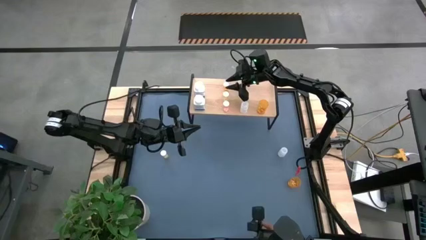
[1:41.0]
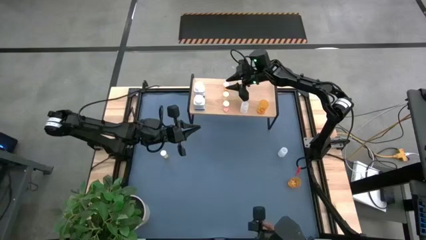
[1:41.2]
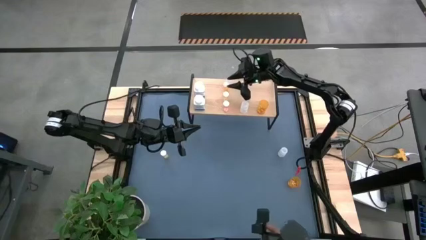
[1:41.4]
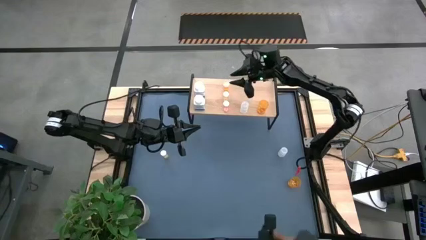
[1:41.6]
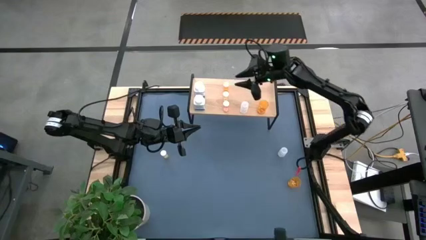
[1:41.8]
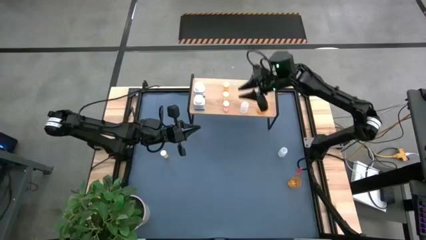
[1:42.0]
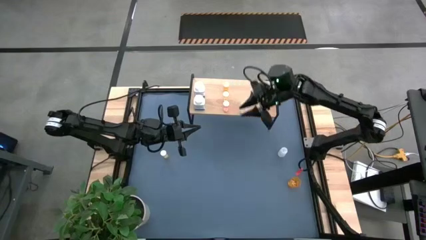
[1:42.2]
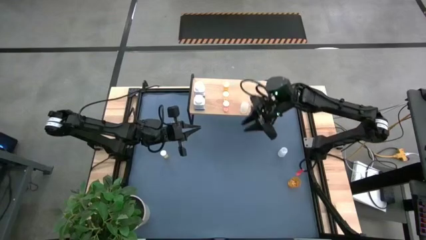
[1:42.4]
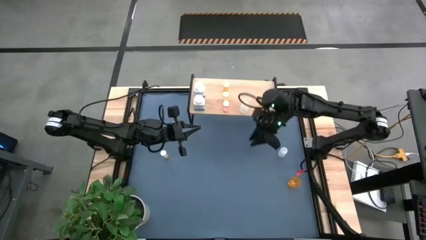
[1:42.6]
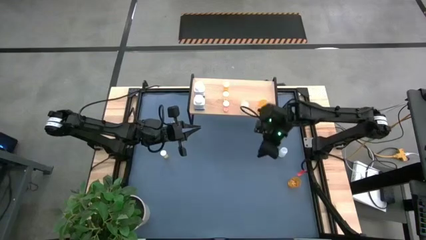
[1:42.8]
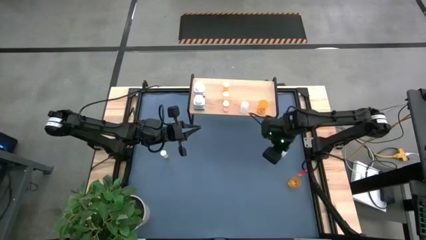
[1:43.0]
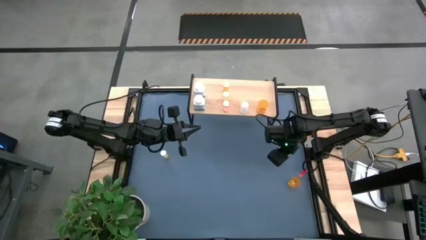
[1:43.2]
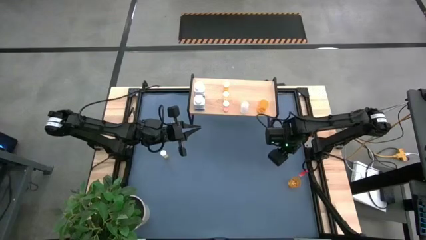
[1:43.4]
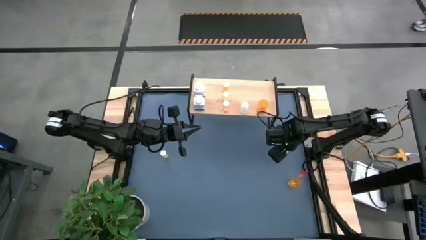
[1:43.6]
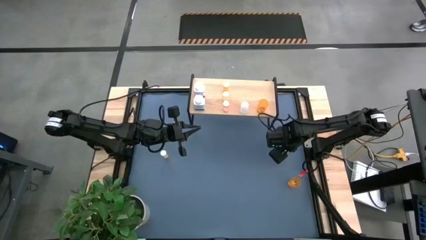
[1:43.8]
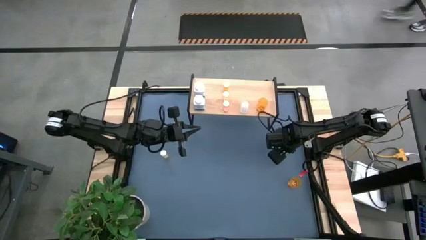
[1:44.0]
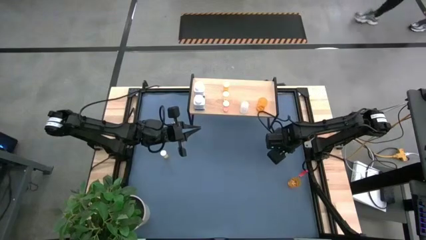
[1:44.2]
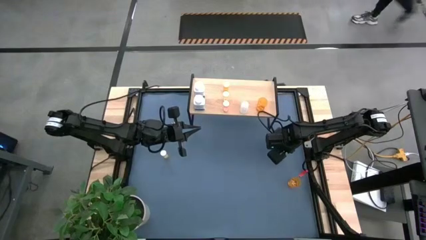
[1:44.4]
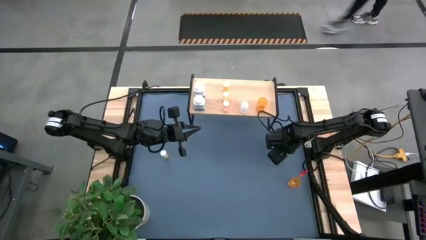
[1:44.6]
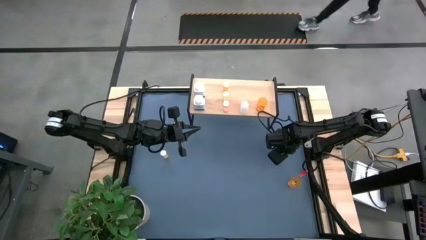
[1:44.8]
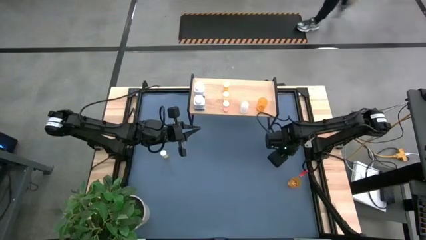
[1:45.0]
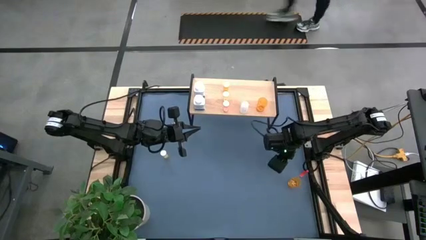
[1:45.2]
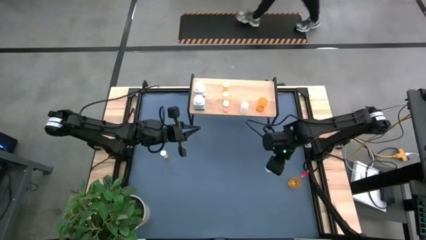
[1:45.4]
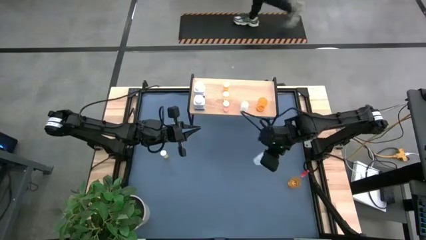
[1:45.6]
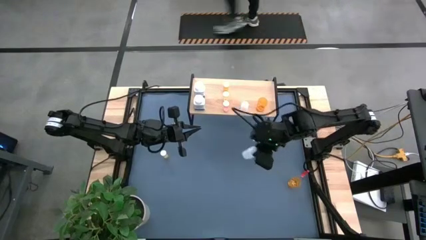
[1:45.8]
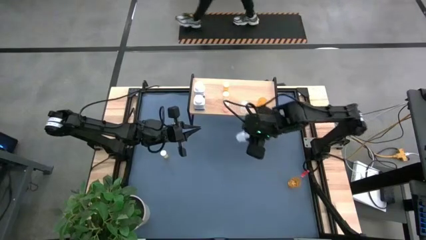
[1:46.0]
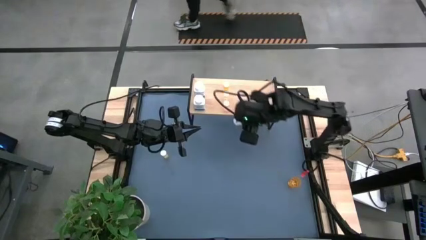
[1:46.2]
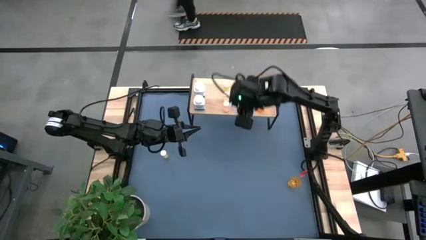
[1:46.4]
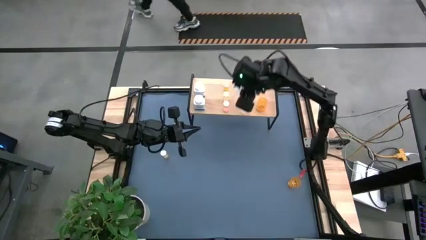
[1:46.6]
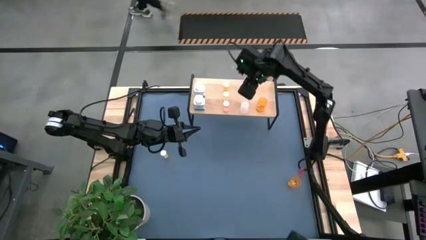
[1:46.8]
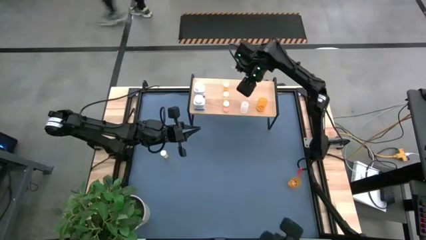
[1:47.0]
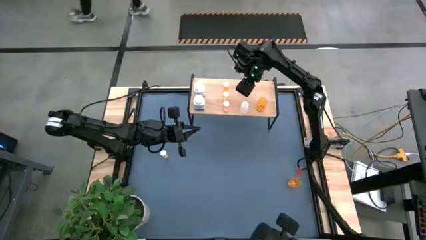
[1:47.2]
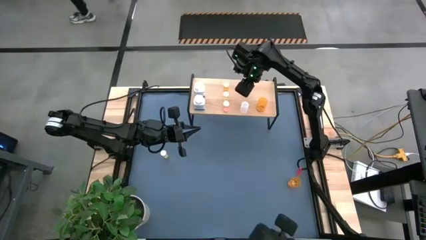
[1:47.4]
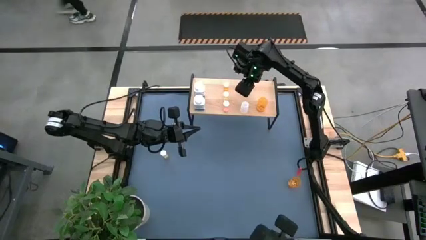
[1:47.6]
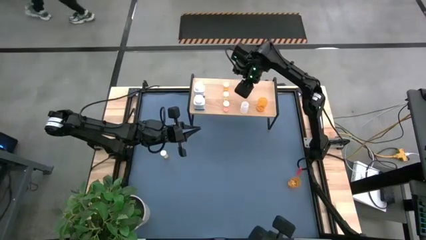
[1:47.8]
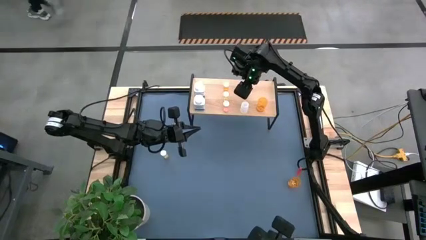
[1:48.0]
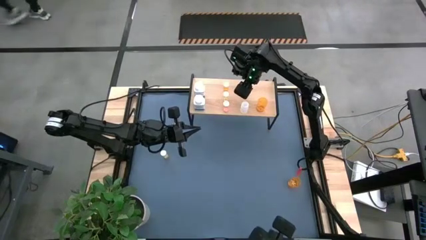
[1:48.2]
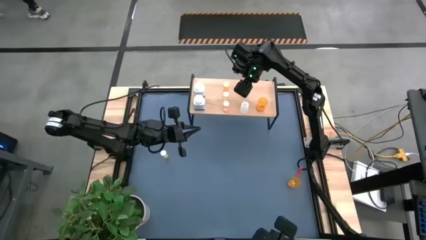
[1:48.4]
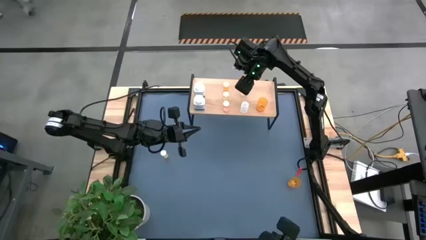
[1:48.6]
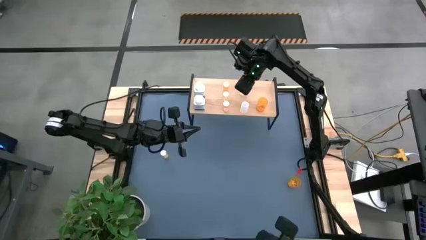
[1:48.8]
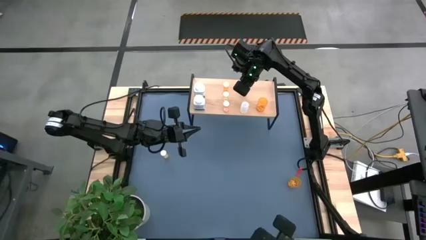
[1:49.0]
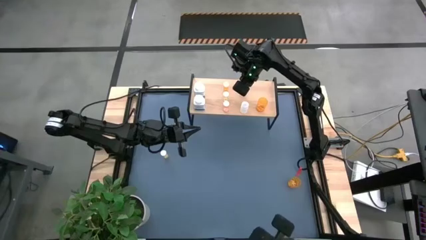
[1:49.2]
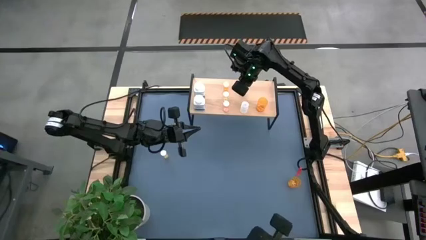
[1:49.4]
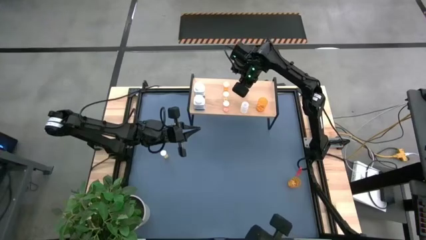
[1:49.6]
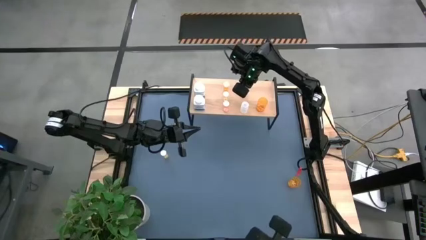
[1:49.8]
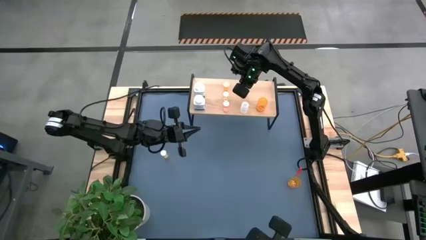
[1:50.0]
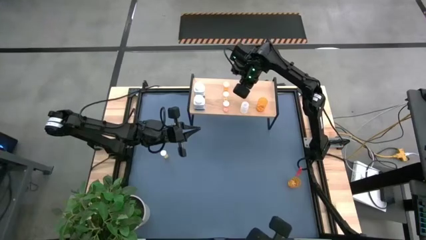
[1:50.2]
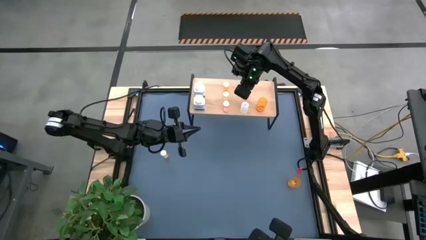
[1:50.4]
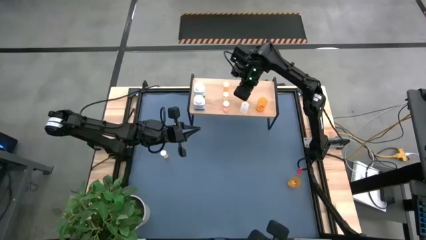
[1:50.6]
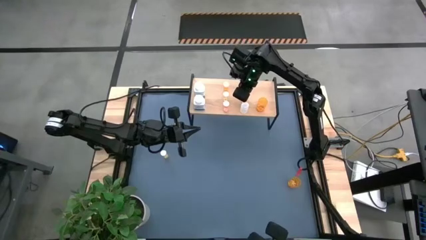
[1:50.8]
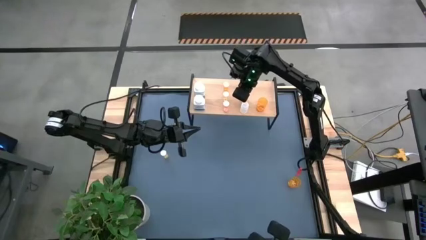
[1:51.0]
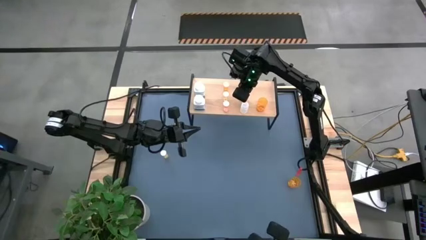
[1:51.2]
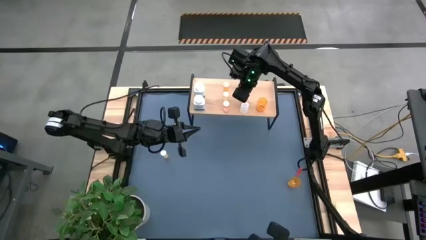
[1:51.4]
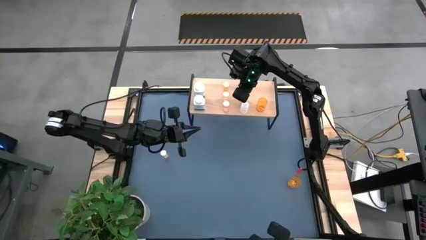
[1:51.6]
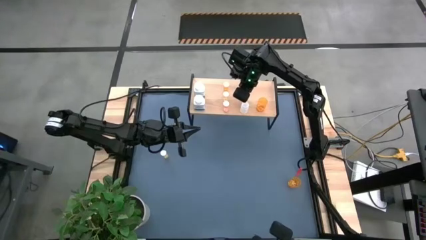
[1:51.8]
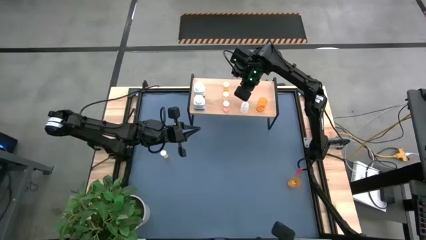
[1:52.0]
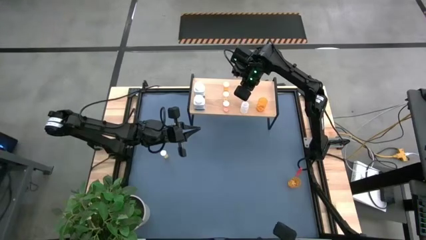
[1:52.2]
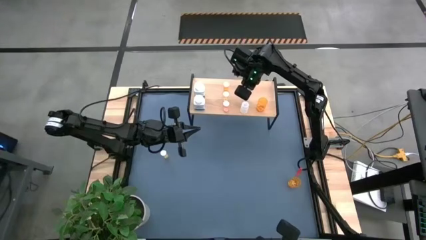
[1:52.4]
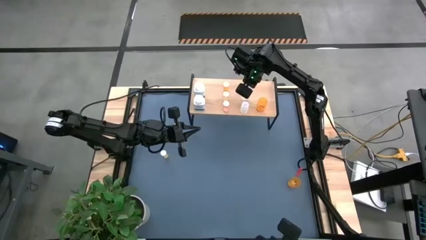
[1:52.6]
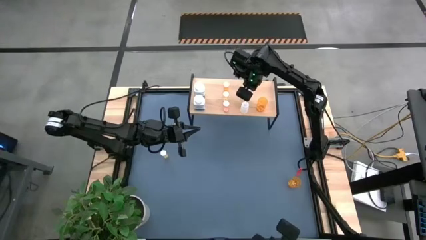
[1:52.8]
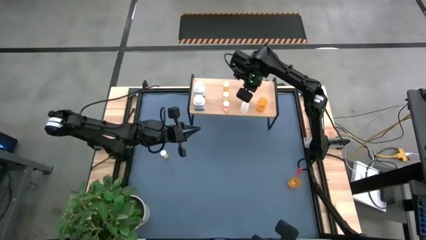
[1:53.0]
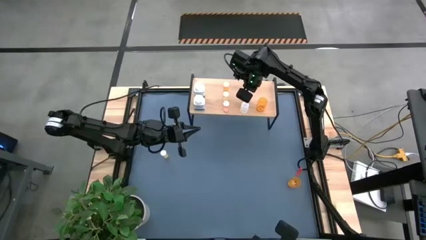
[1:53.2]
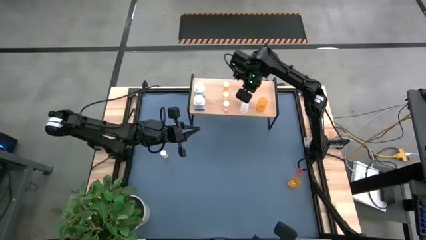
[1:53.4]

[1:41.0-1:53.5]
Task: Pick and place medicine bottles onto shelf by color
Put the transparent pill bottle on the shelf

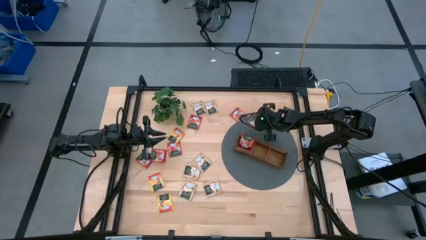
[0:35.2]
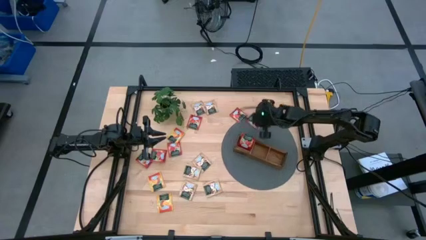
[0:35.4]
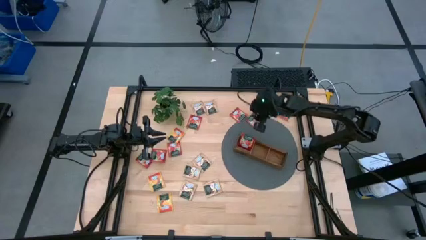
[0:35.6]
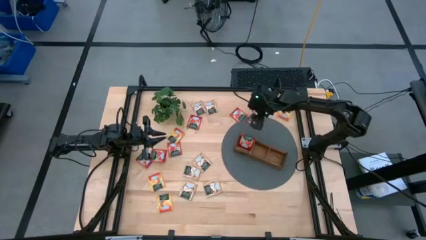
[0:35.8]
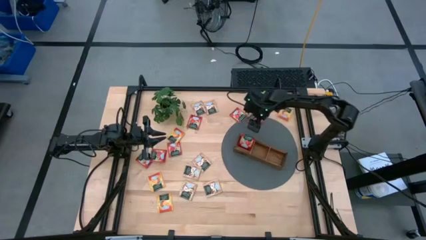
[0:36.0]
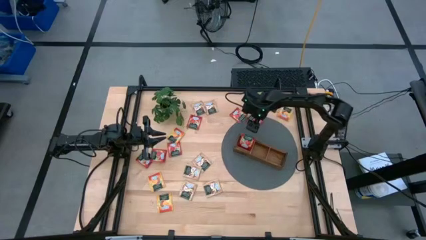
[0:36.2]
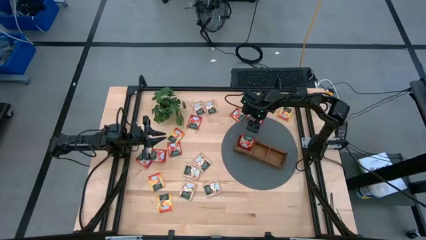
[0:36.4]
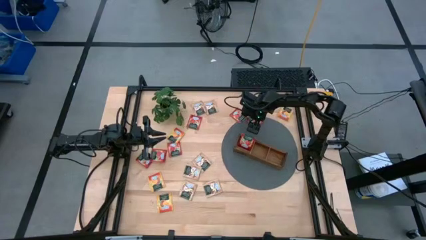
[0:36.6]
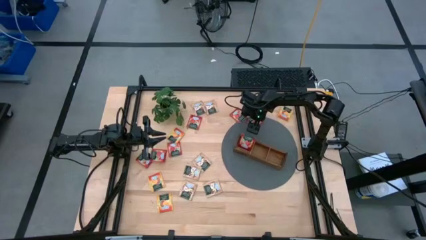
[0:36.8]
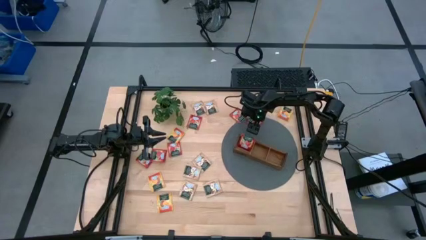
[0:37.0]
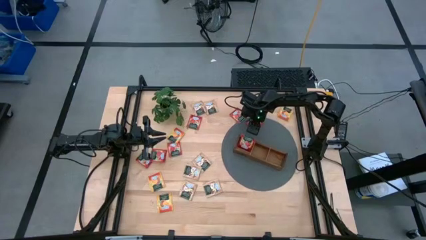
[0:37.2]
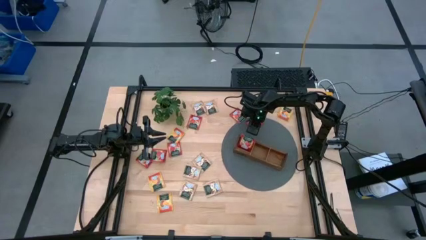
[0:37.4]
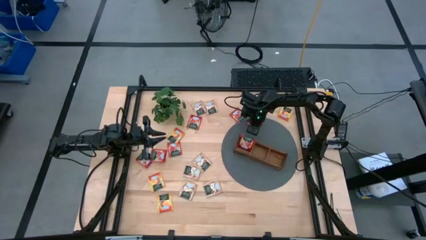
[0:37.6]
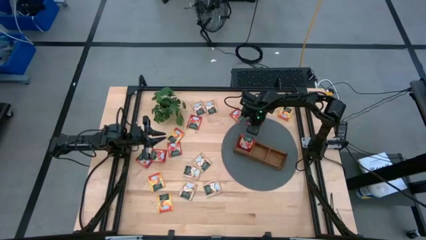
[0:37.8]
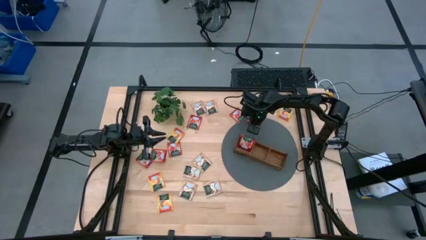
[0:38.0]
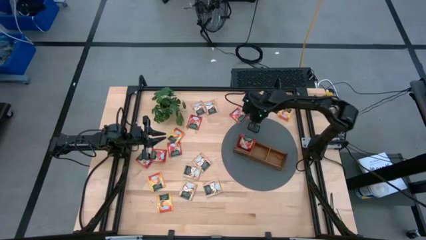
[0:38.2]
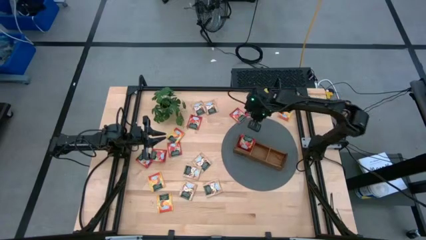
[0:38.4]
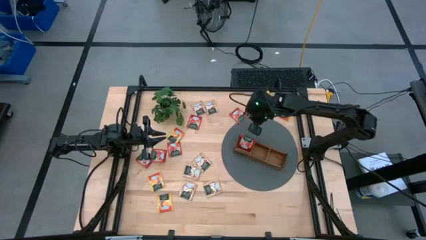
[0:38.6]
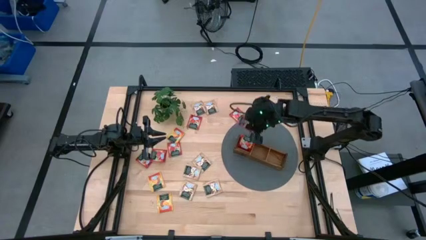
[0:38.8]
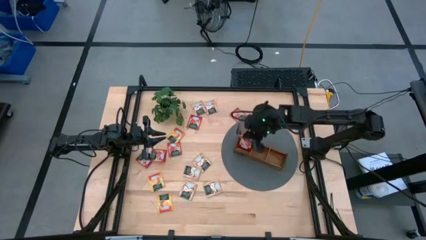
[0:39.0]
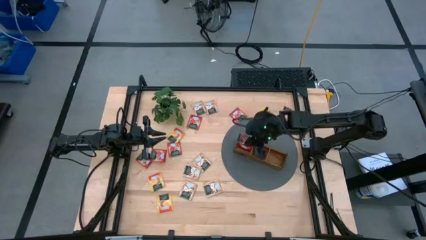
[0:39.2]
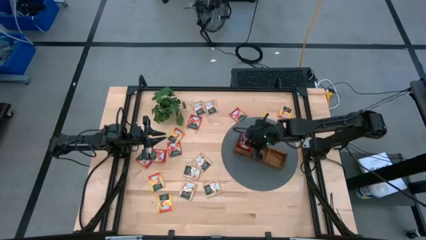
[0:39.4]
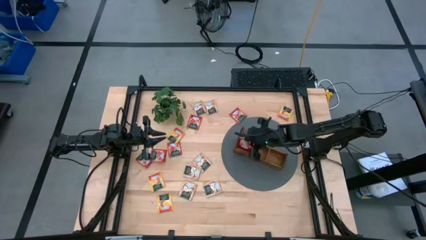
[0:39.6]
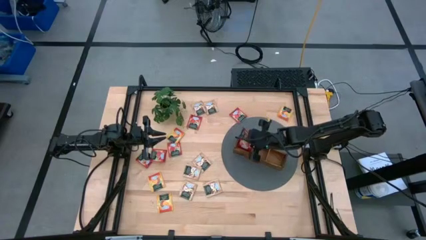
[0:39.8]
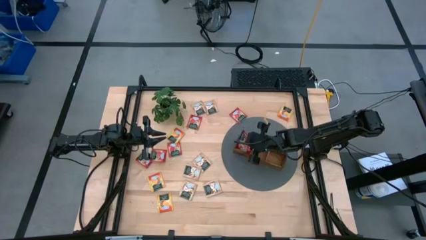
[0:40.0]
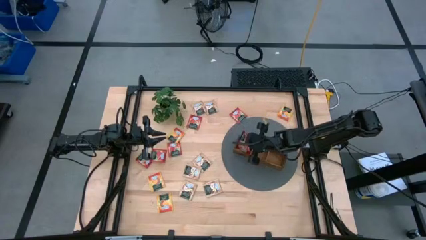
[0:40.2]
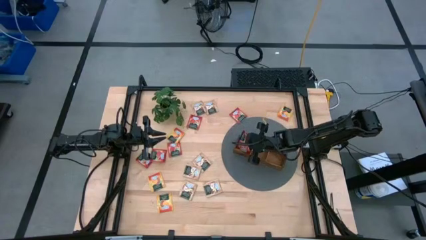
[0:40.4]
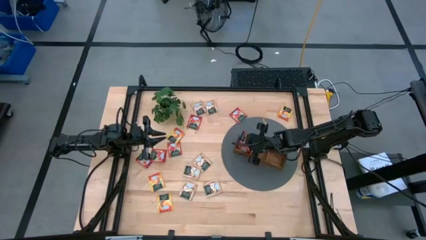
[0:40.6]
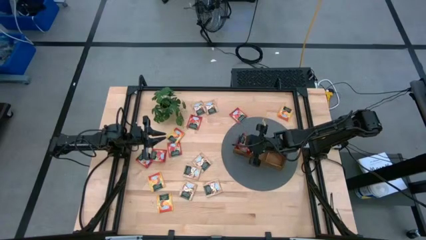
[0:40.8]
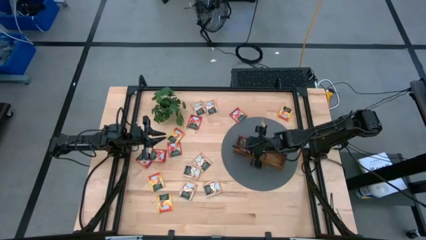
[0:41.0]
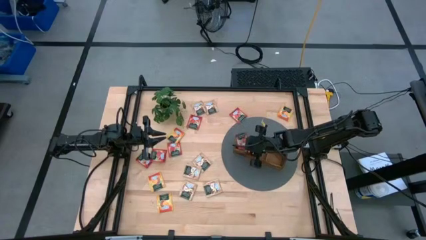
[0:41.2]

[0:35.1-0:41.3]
Task: Pick & Place Tea
Put the red tea bag into the left section of the wooden organizer
